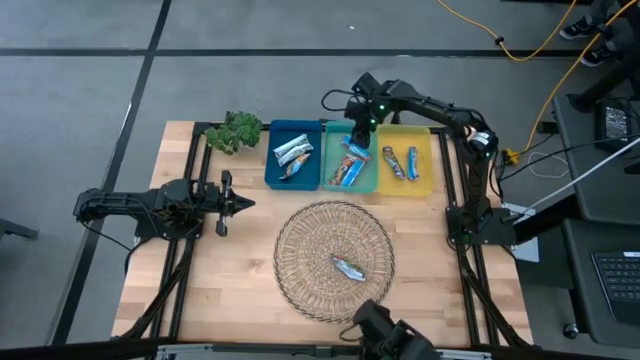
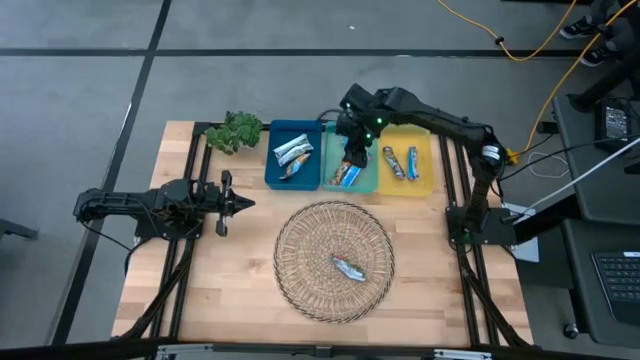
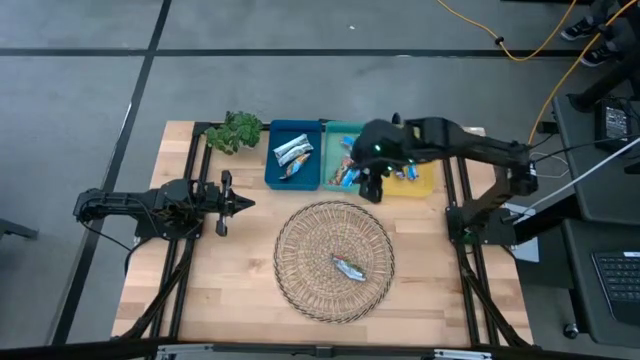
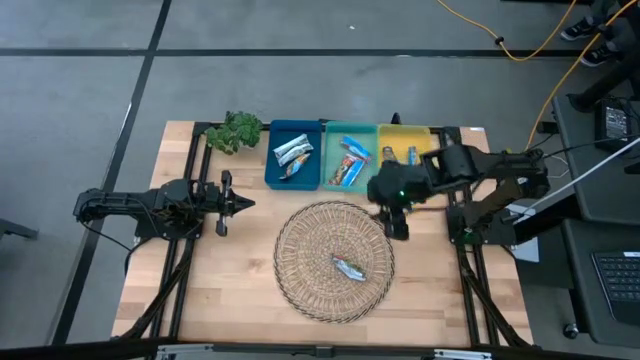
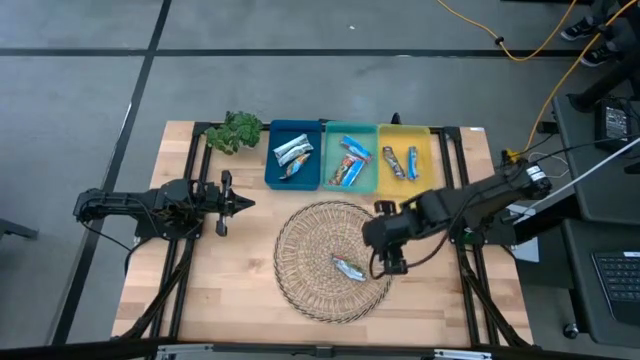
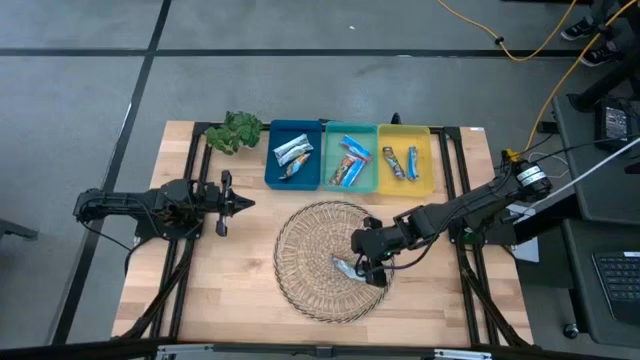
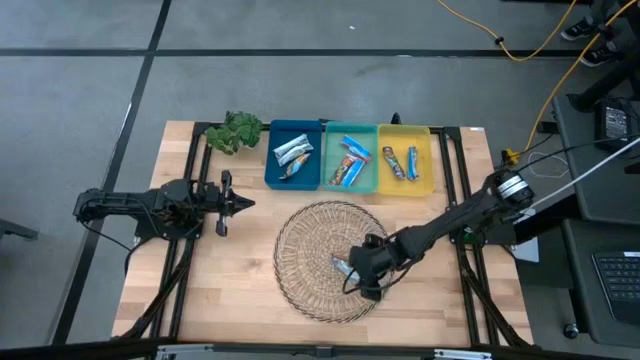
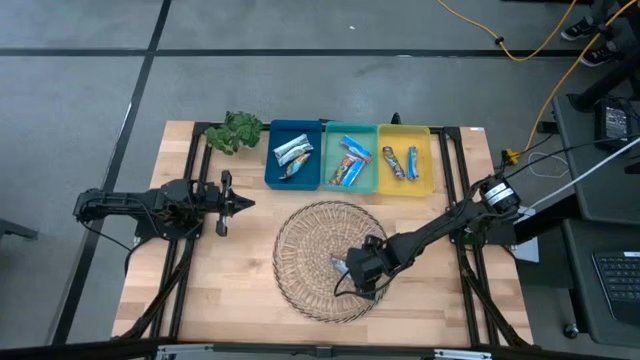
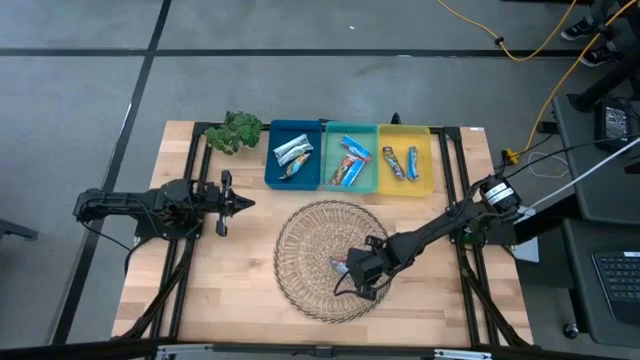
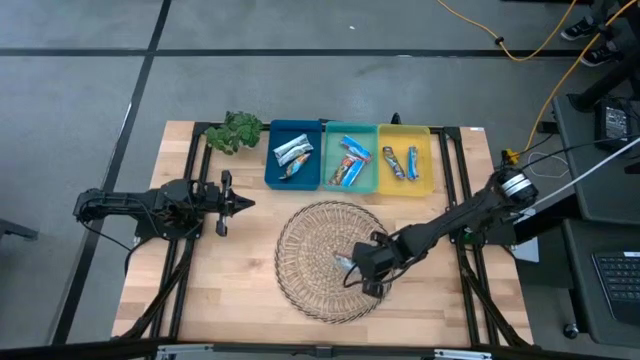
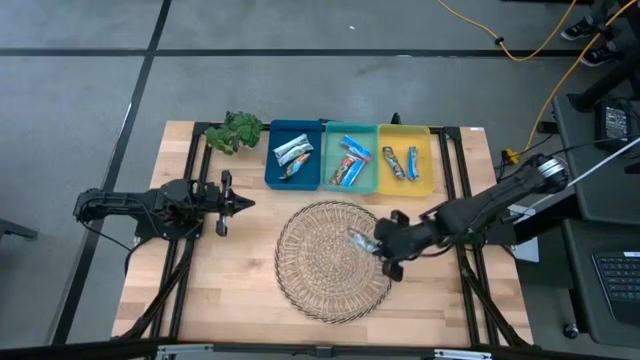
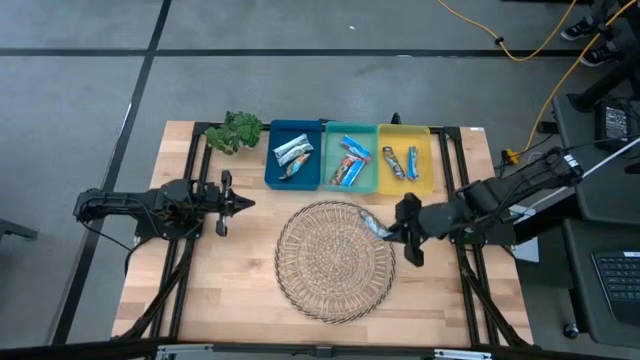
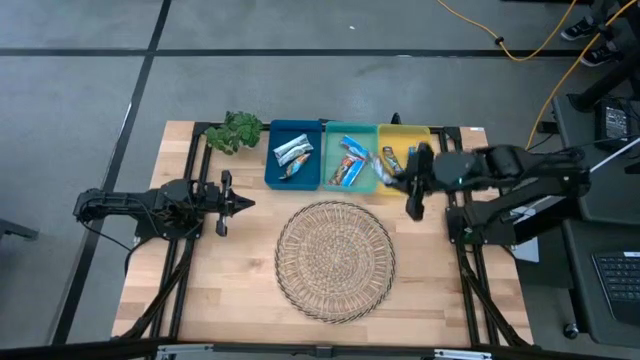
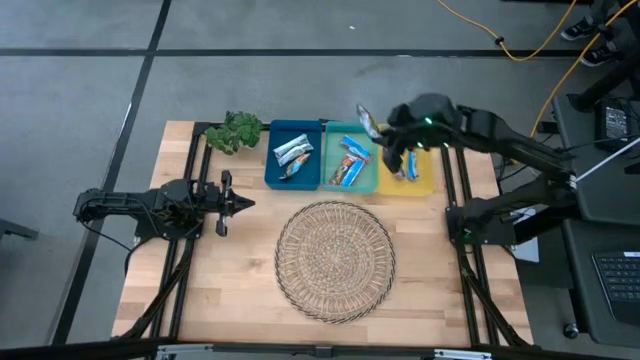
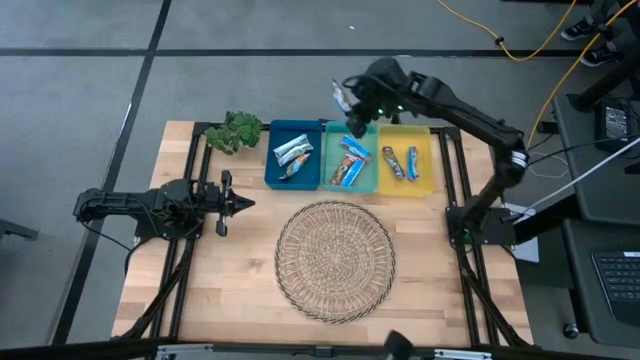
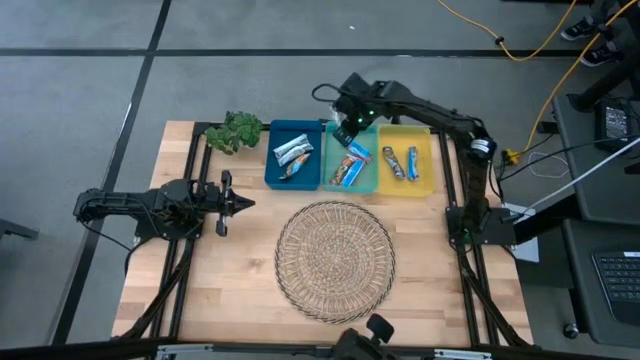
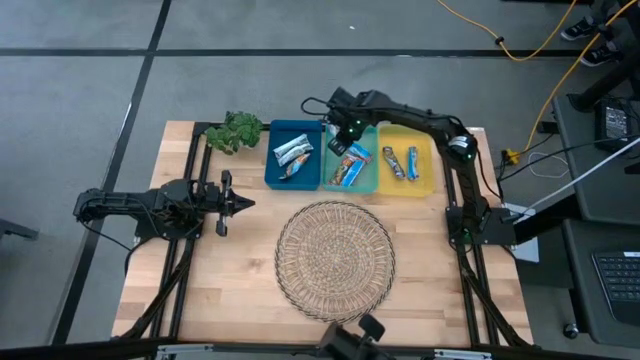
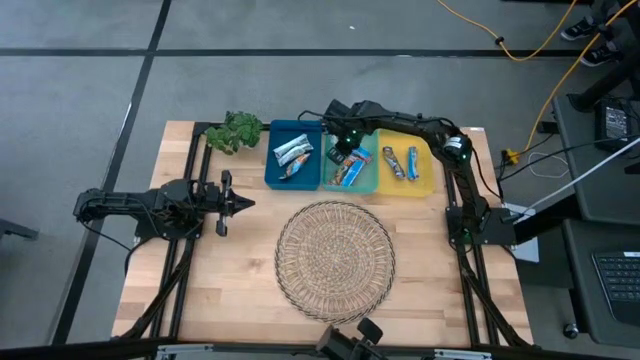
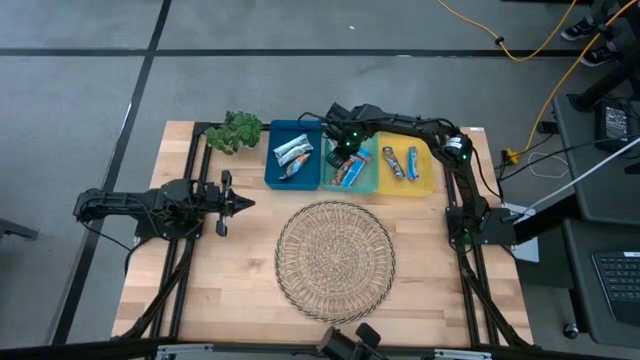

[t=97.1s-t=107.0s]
Task: Pick and place Granola Bars by type
Put the orange granola bar into the green bin

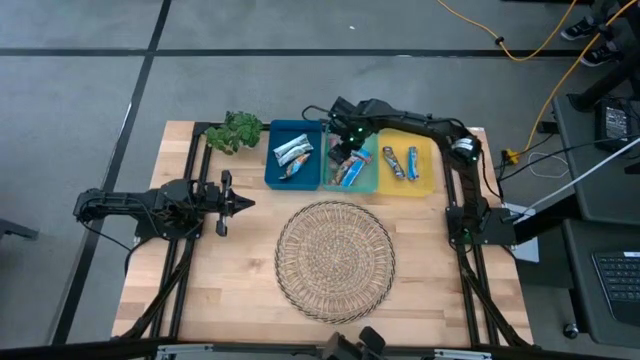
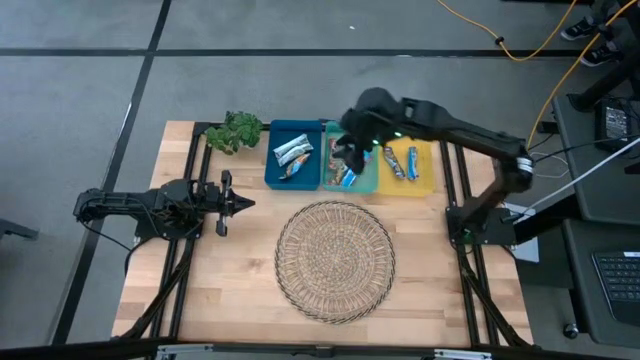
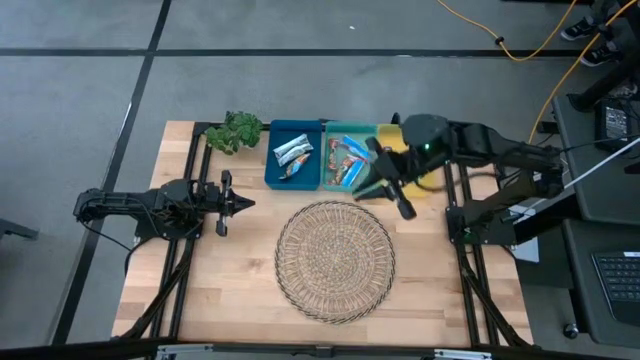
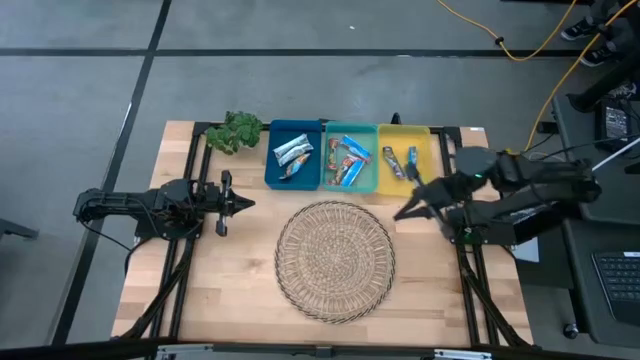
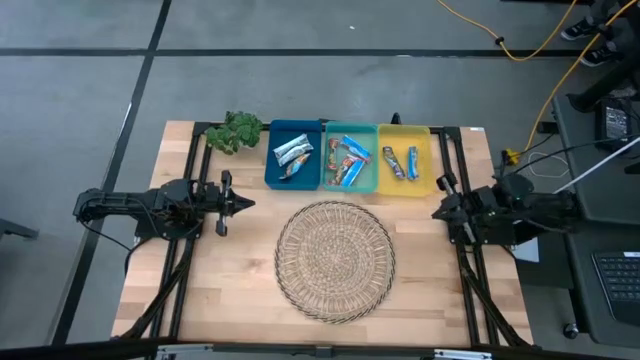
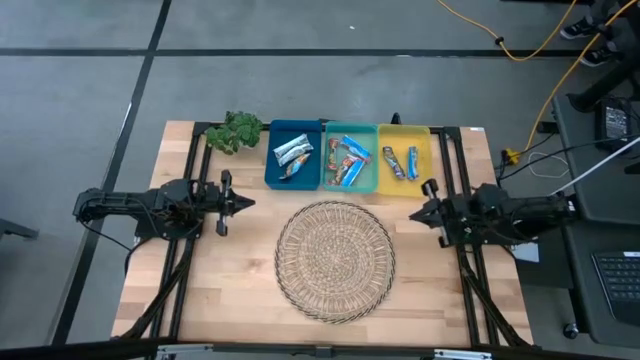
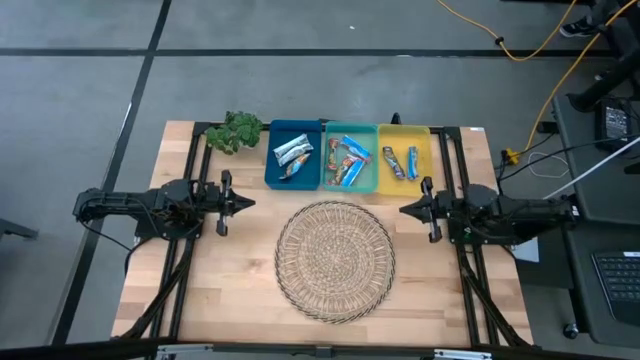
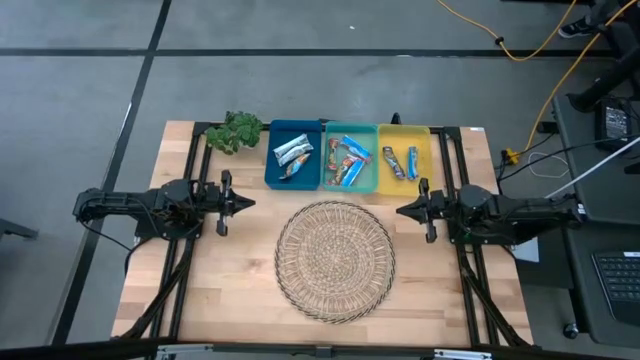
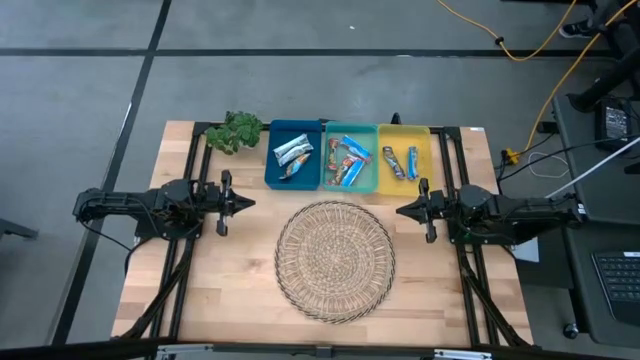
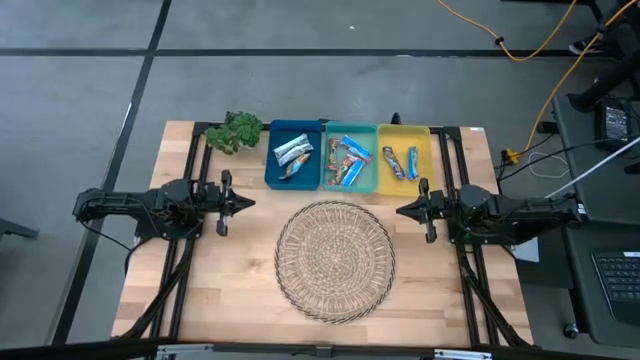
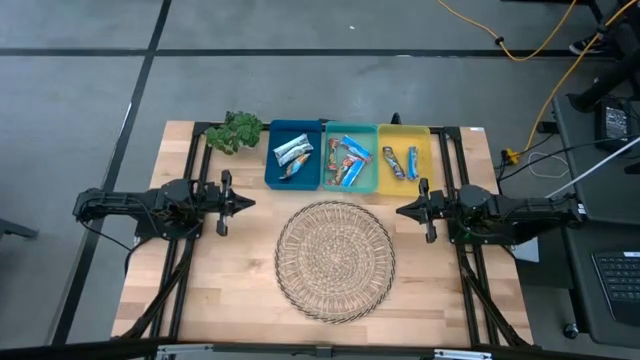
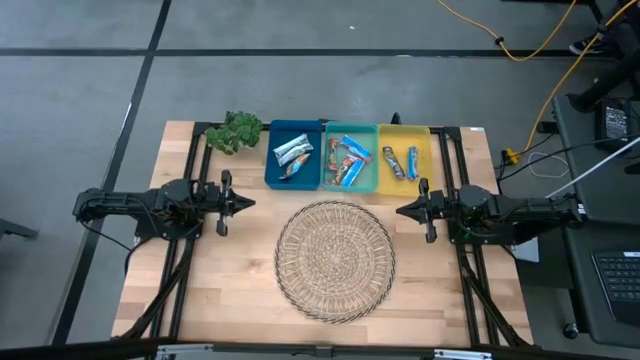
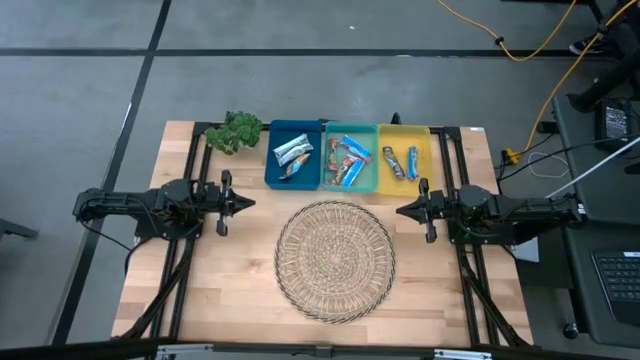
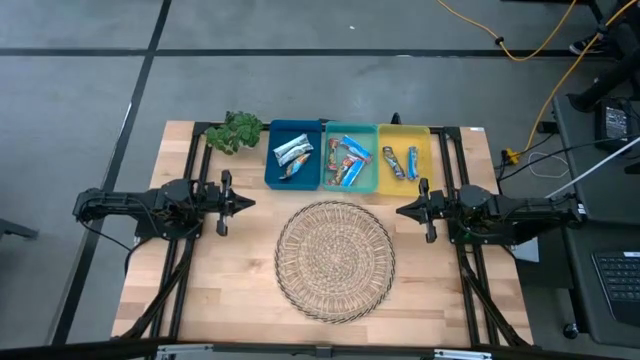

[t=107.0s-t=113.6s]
Return to Home Position

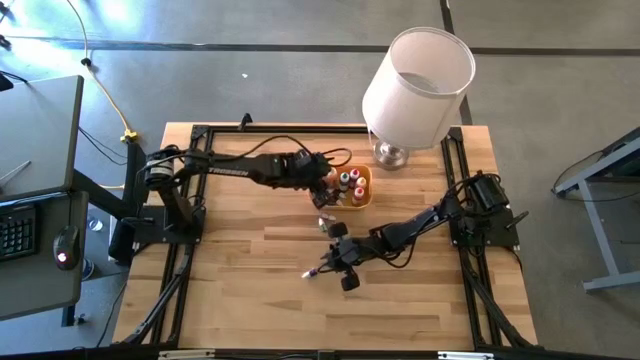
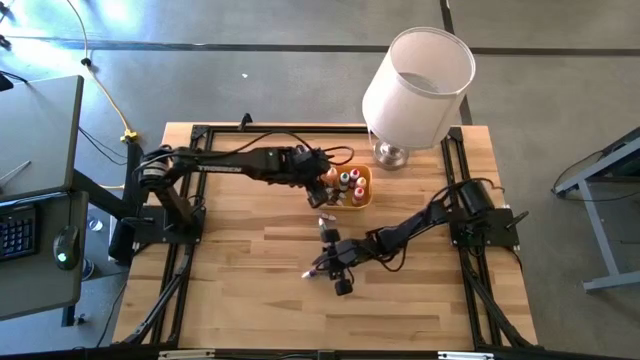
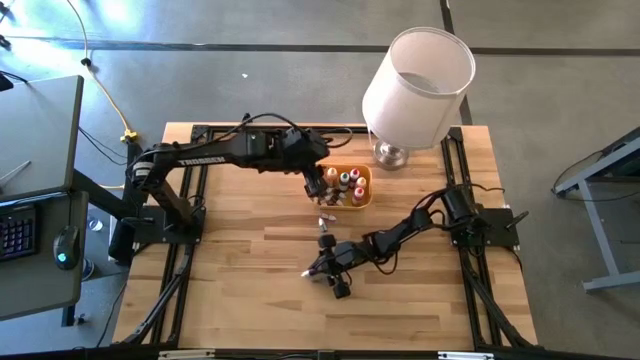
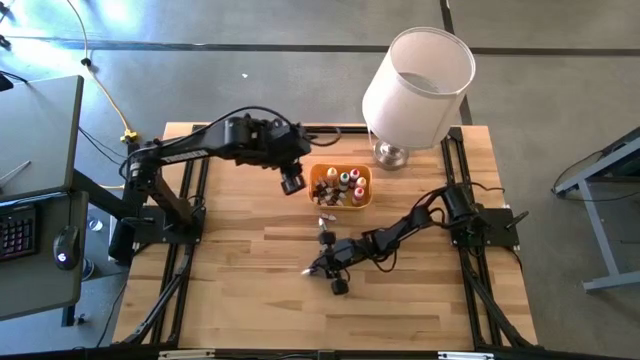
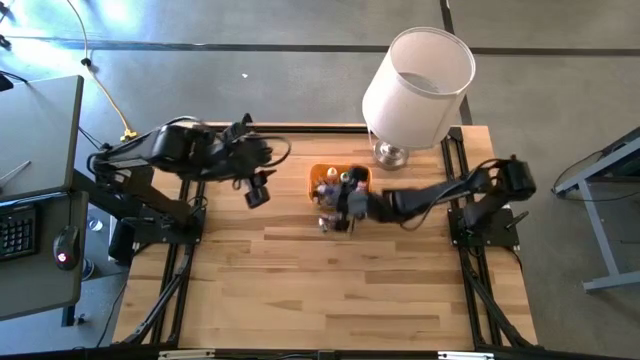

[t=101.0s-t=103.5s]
Task: Pick & Place food coloring
Put the small blue food coloring bottle into the yellow container

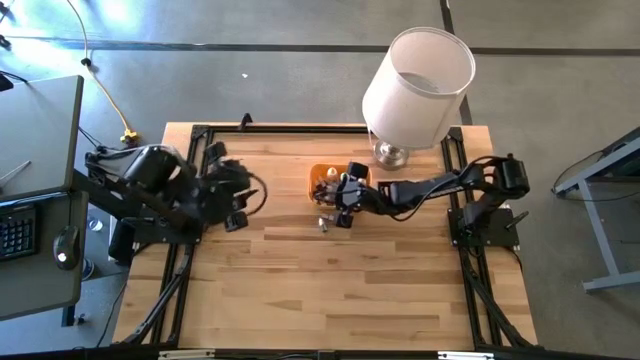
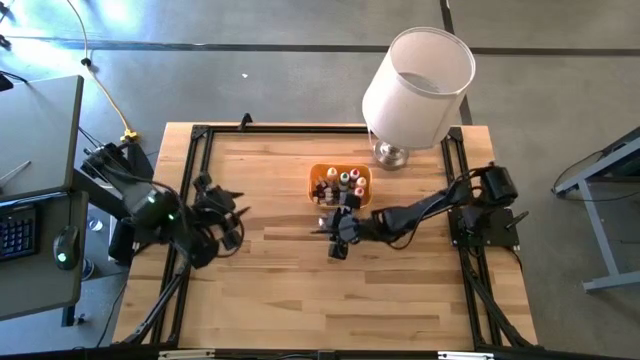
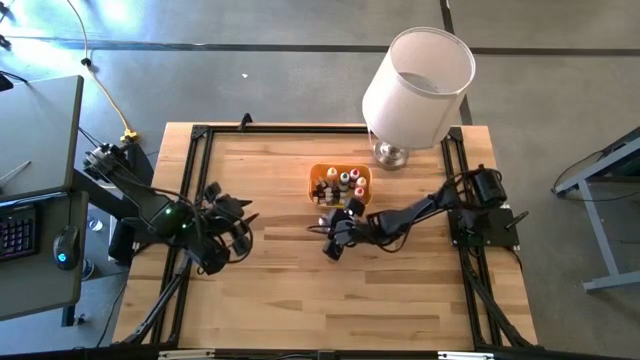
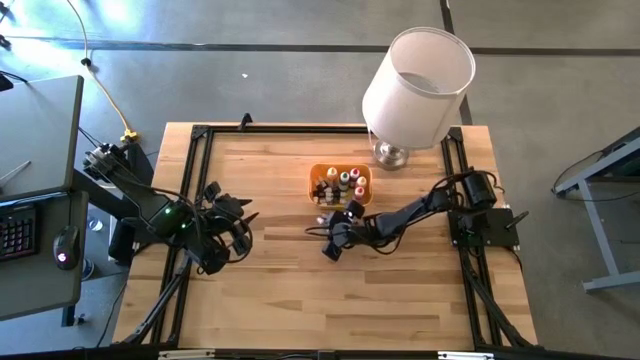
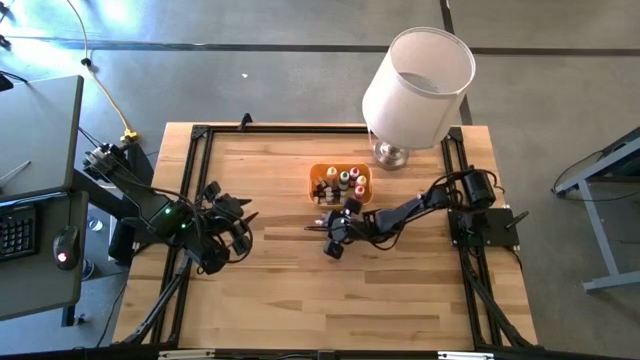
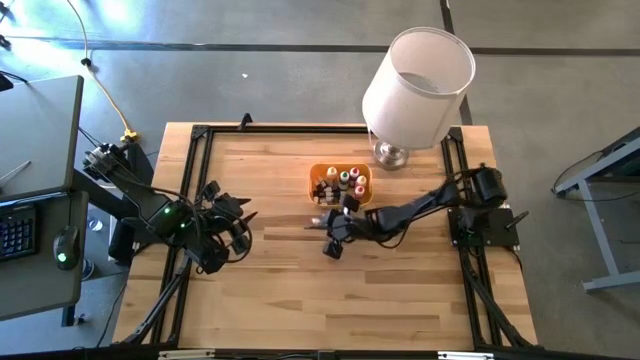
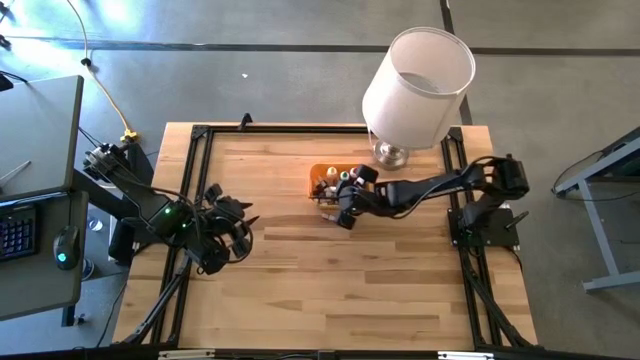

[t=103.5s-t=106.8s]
Put the small green food coloring bottle into the yellow container
